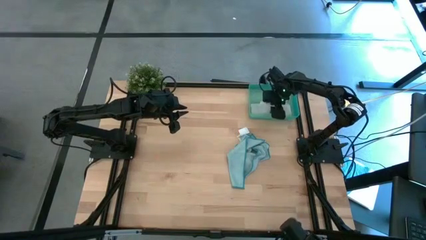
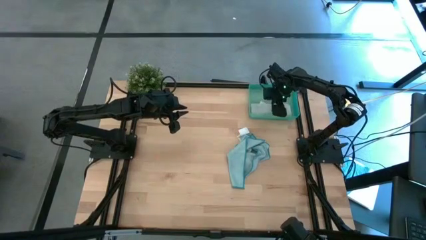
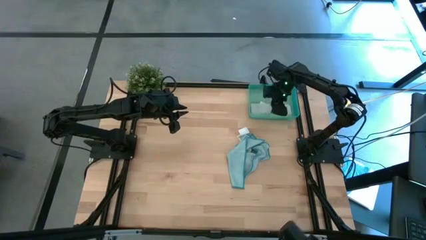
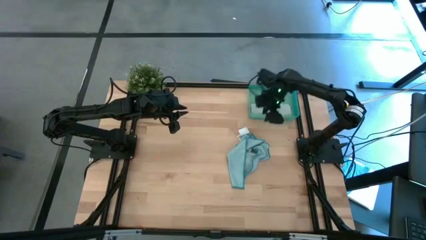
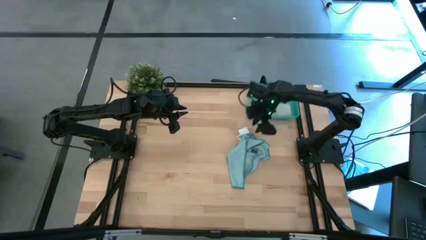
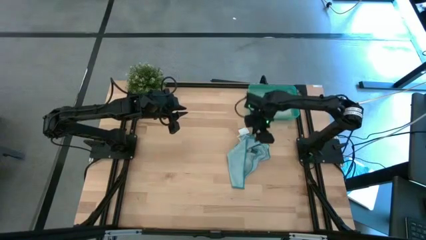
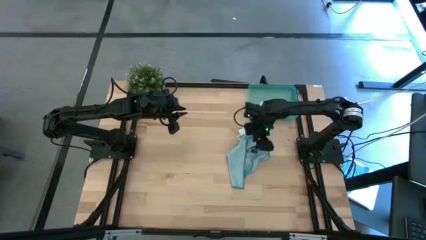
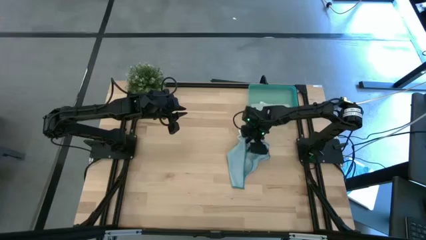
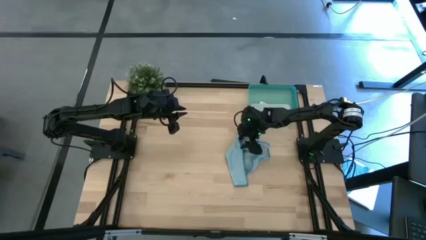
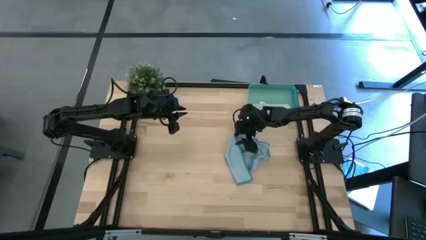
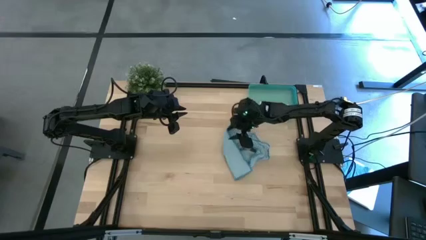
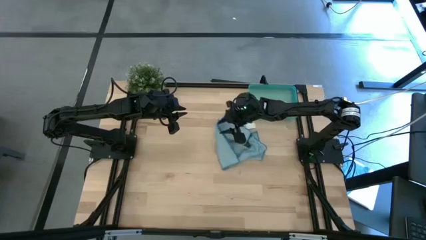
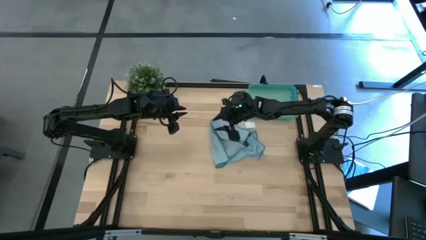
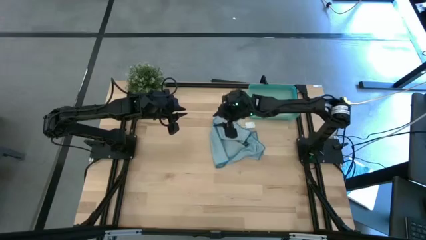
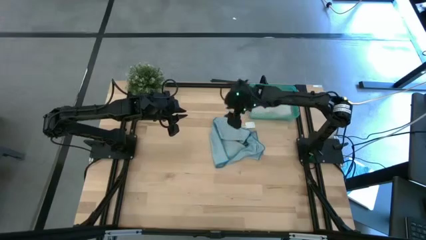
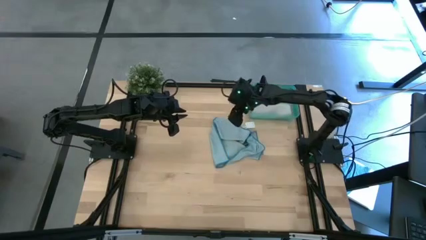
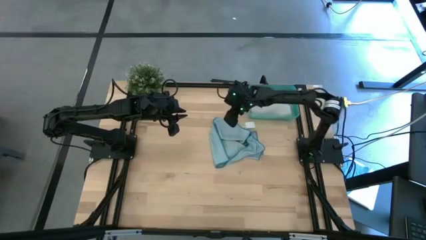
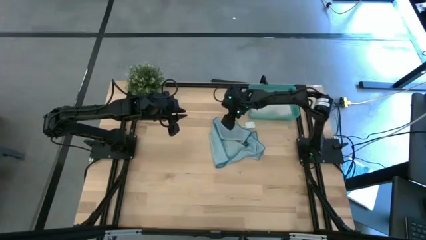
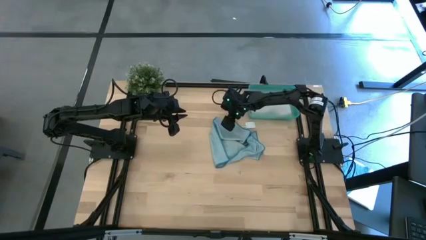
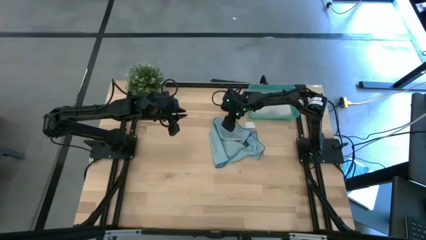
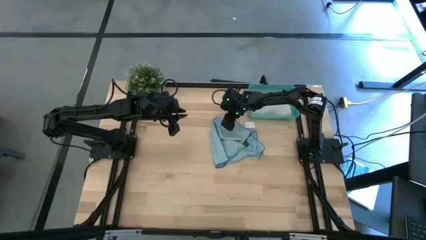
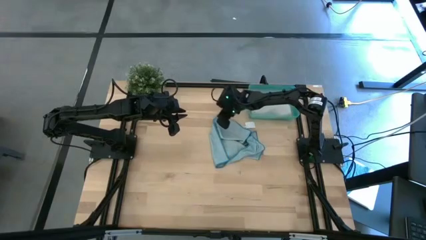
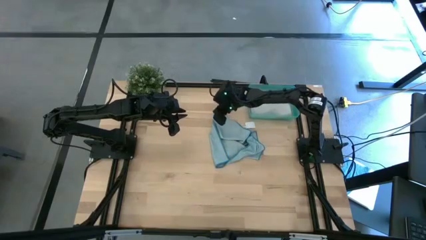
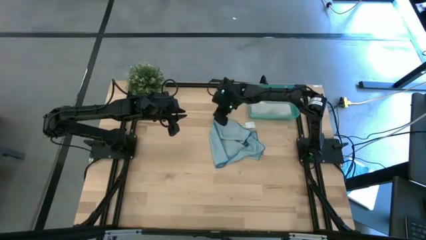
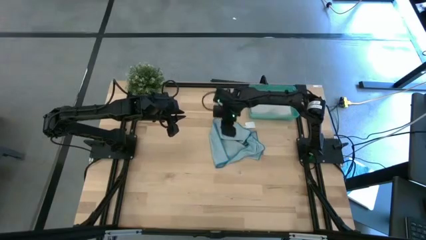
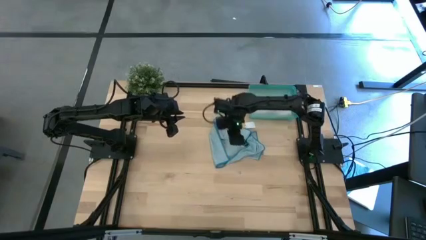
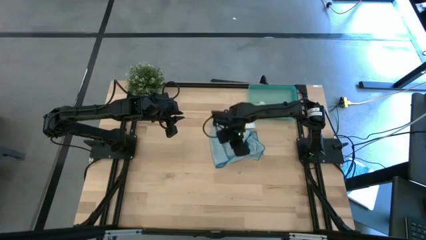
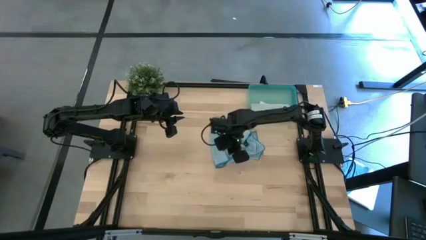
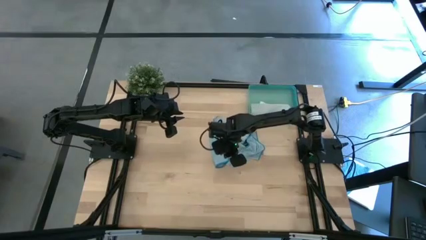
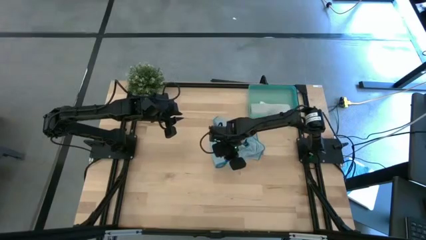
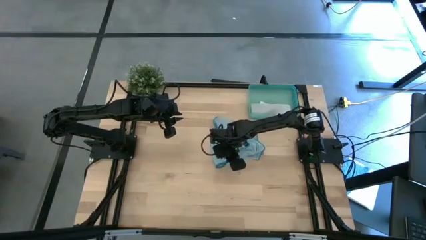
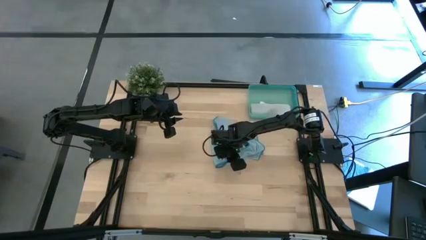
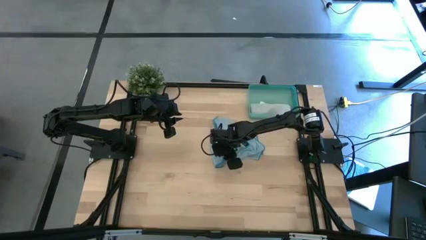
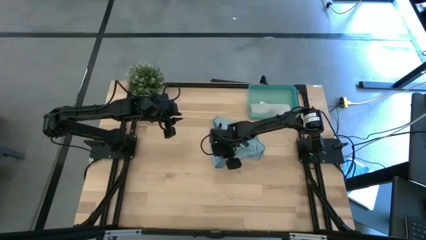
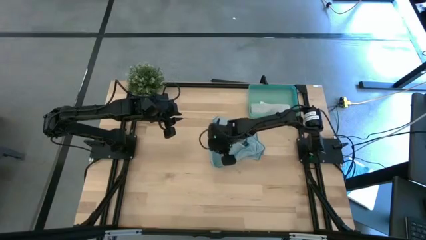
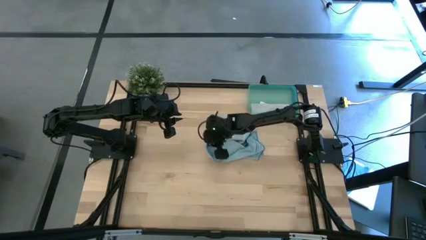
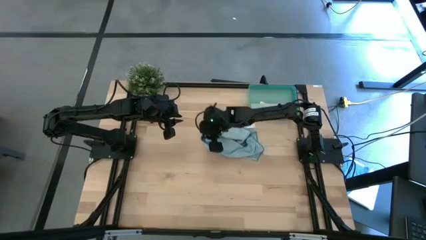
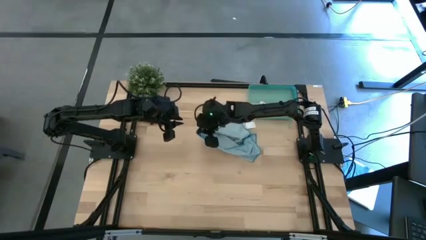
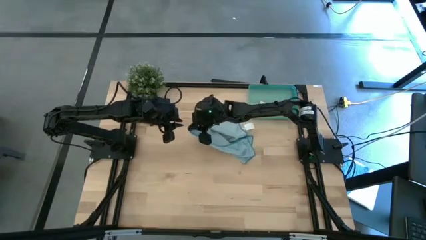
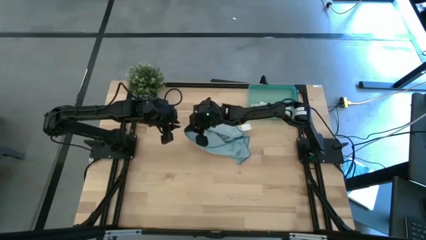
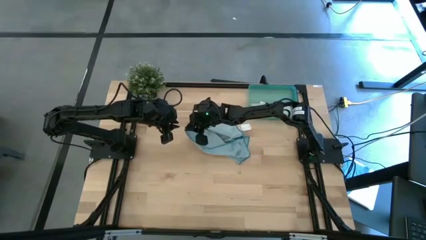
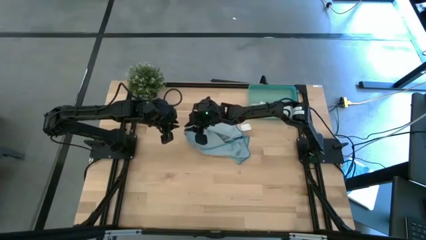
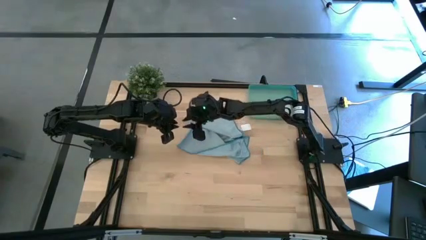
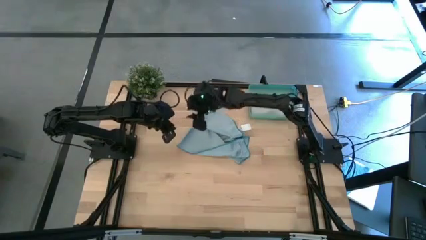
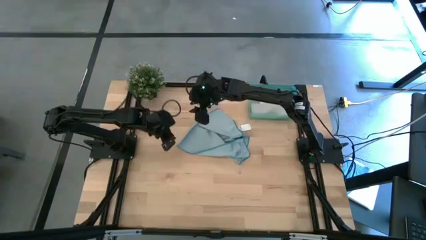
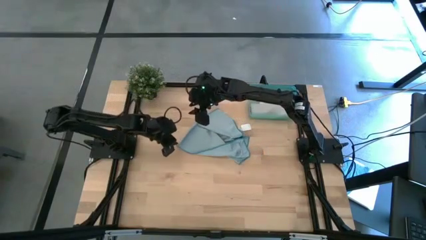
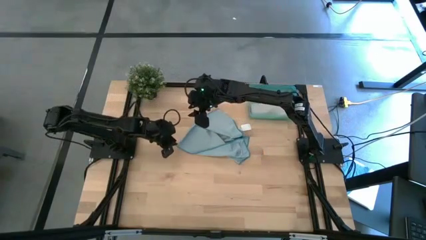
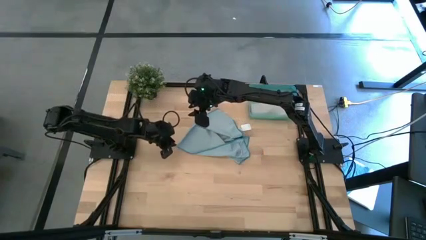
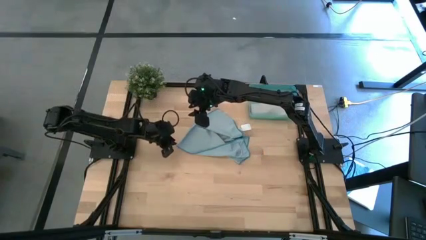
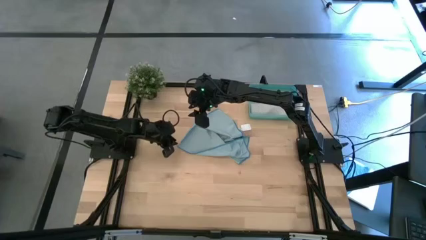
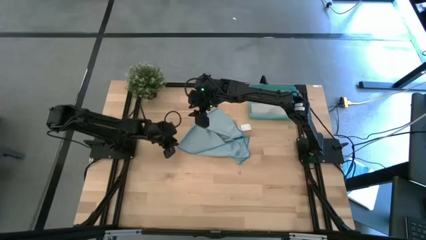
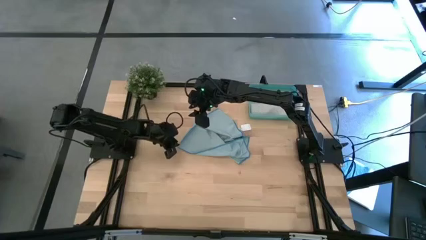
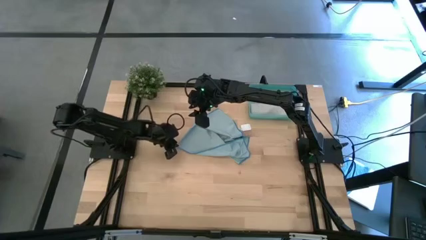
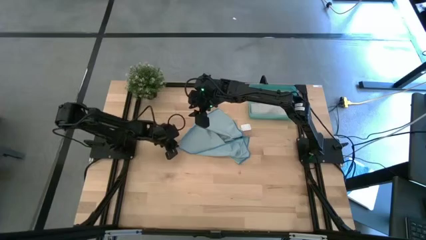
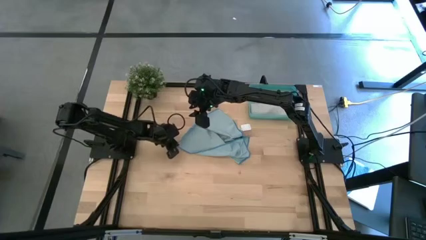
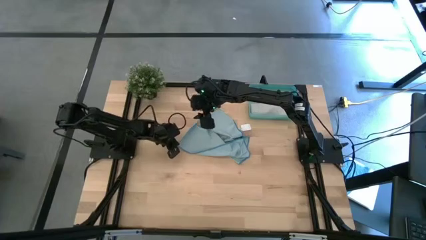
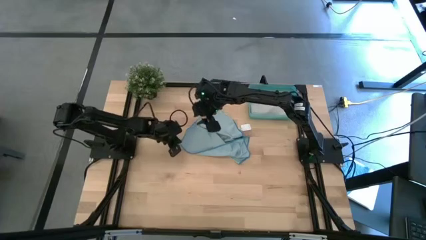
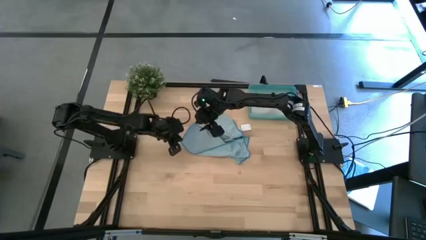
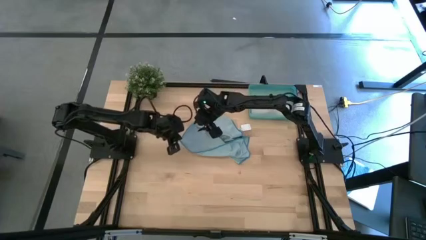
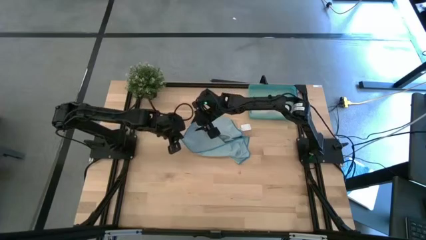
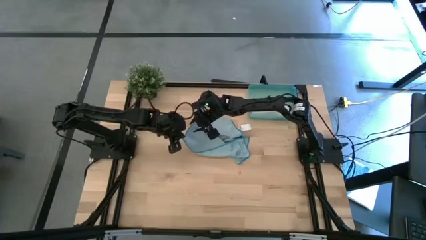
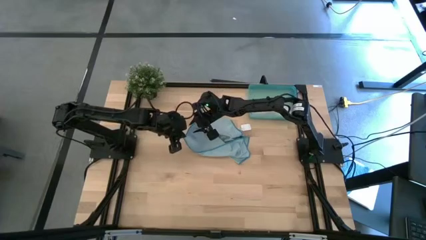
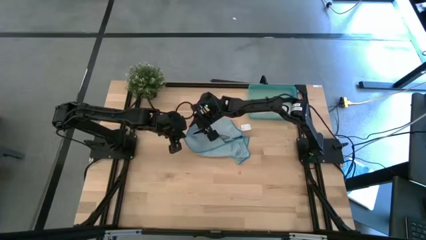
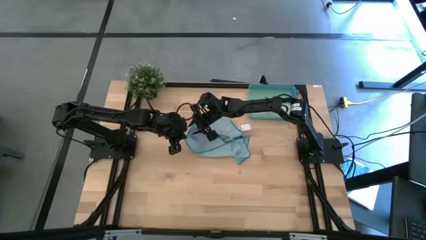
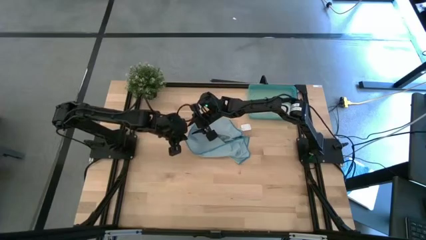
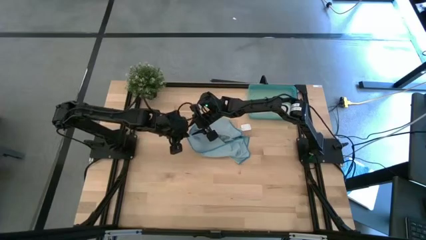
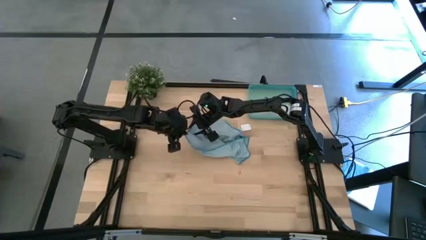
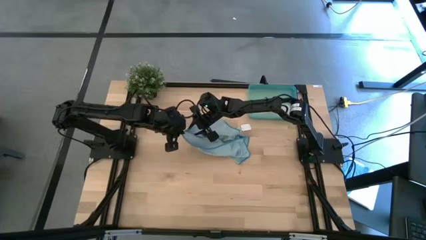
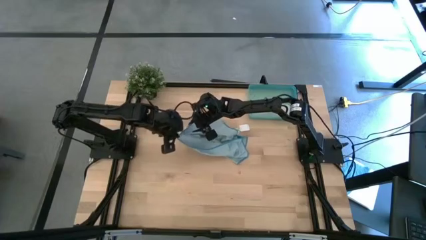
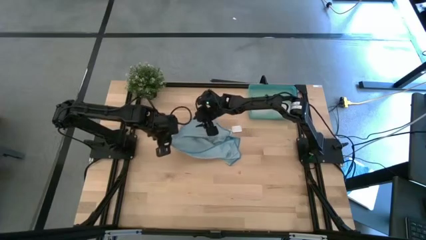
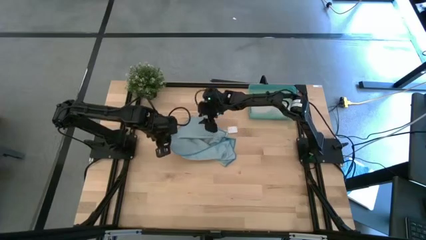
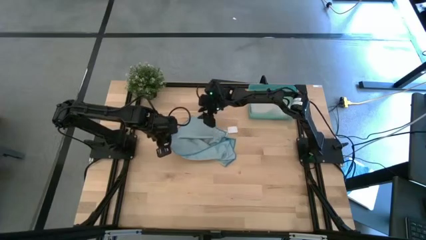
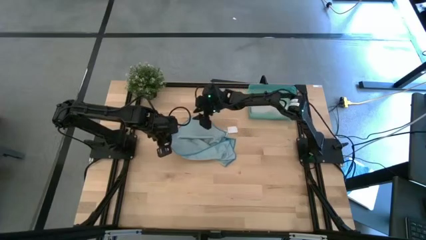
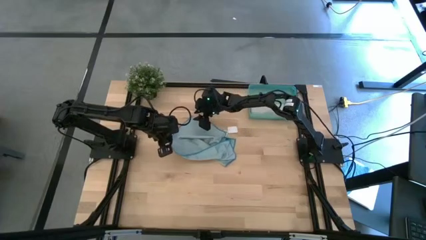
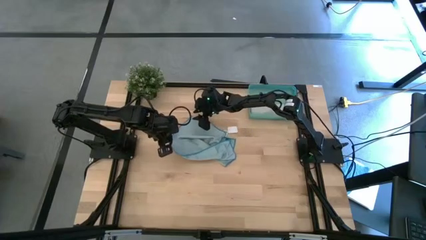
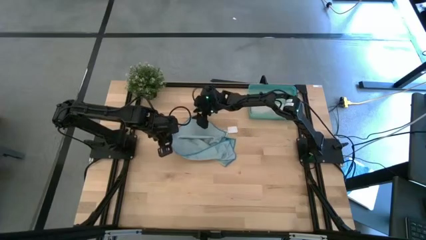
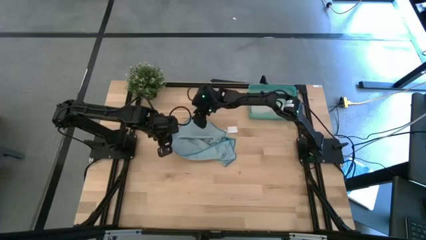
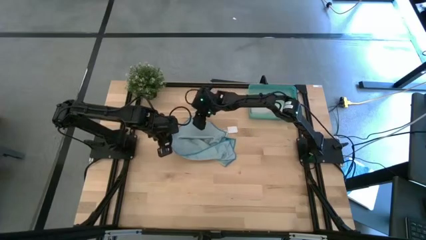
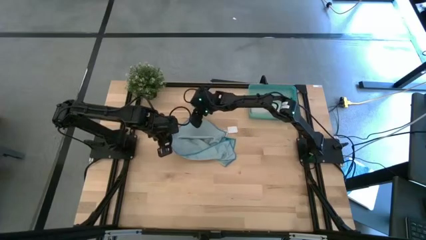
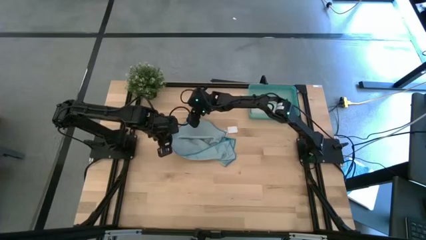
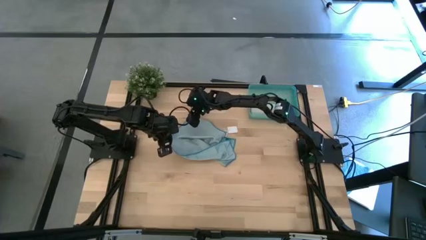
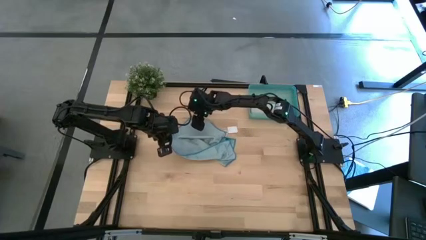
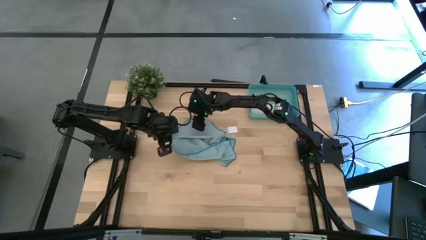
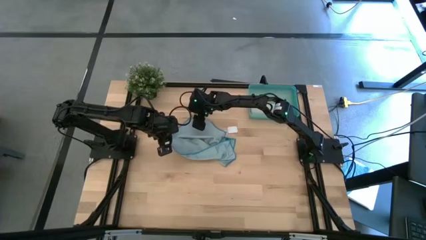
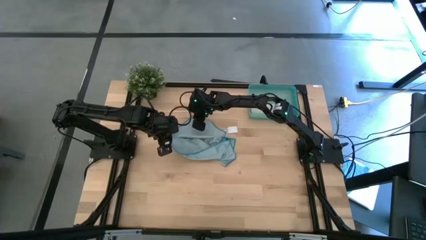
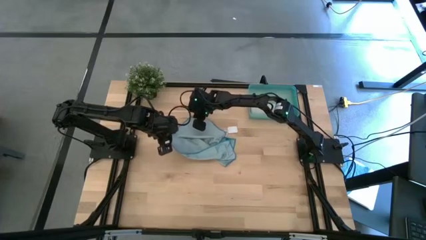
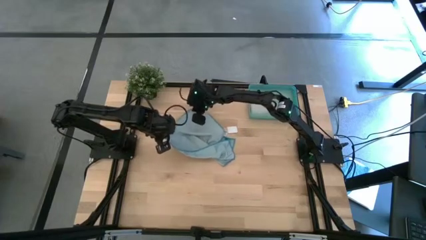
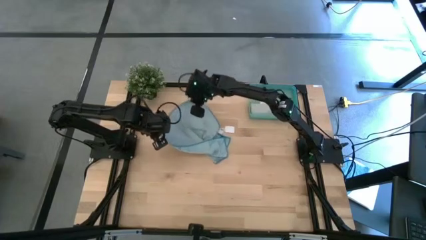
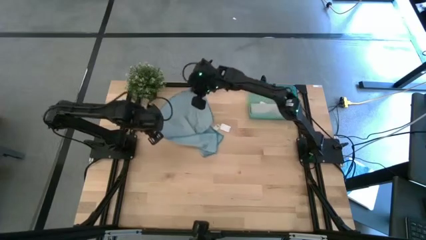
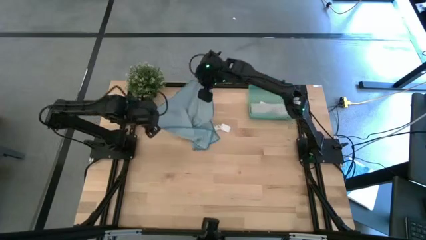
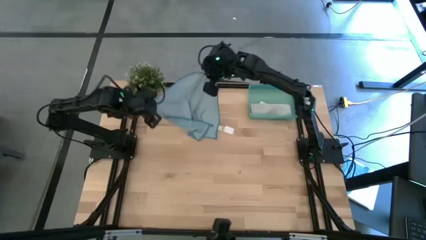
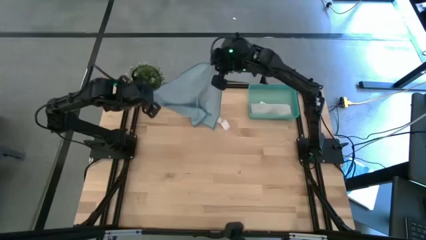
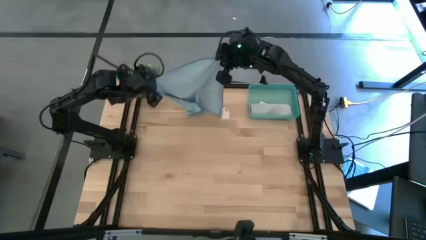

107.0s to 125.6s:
Task: Roll microfiber towels into tight, uniform cylinder then place into a basket
Roll the blue microfiber towel
